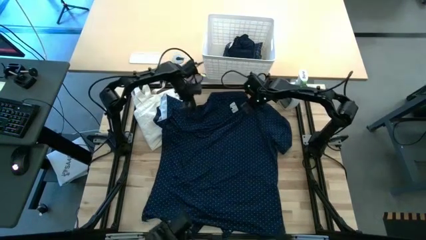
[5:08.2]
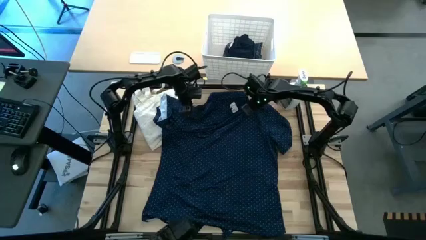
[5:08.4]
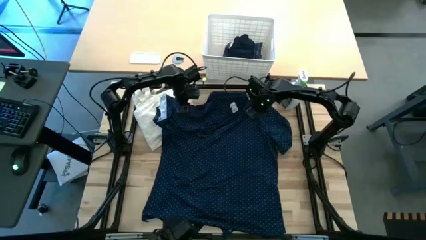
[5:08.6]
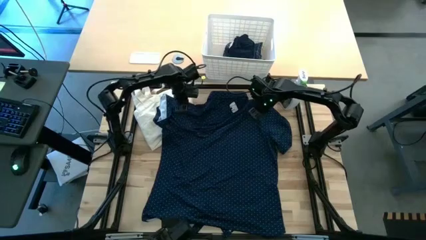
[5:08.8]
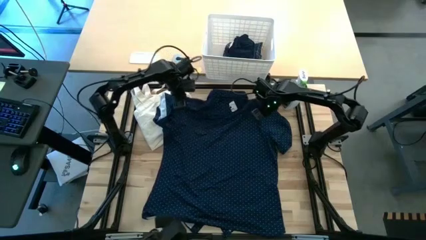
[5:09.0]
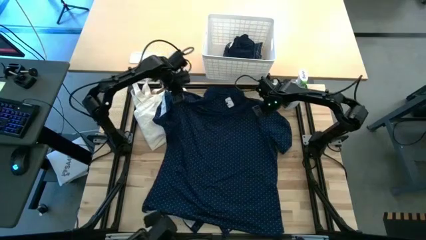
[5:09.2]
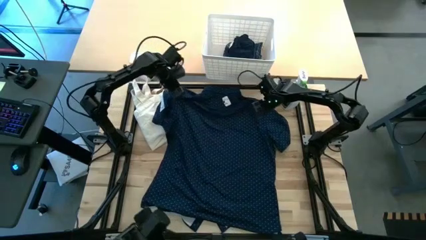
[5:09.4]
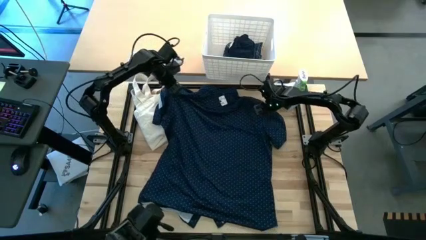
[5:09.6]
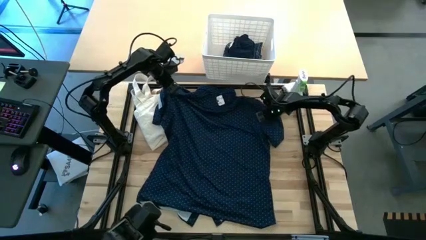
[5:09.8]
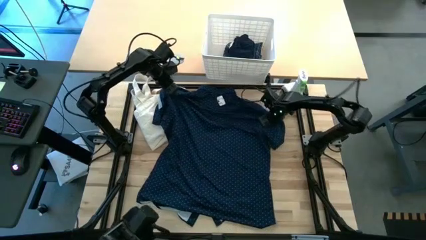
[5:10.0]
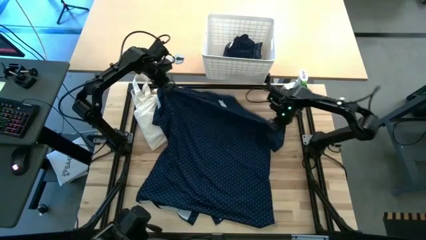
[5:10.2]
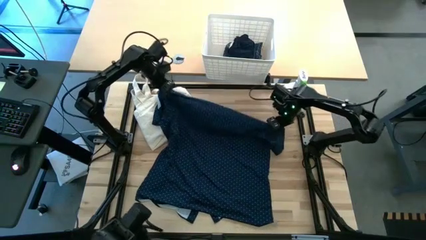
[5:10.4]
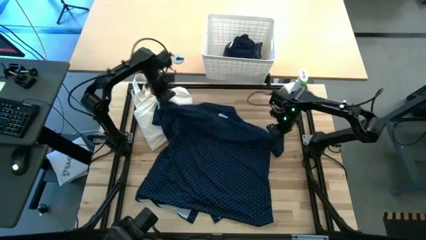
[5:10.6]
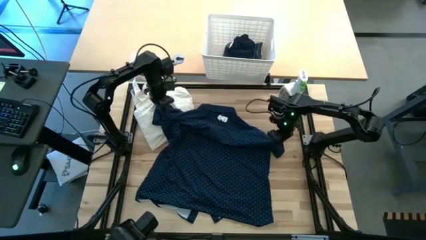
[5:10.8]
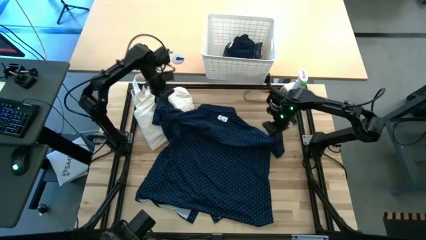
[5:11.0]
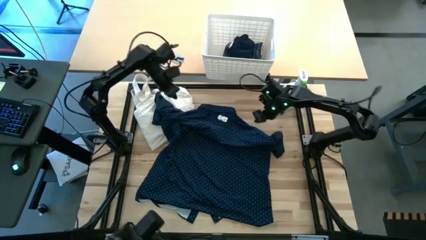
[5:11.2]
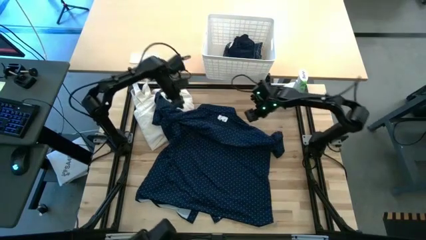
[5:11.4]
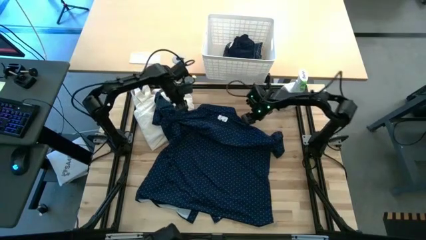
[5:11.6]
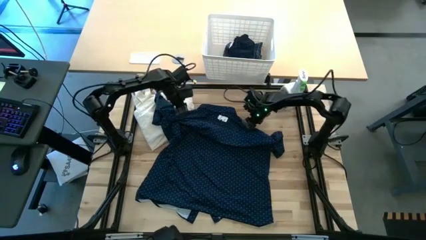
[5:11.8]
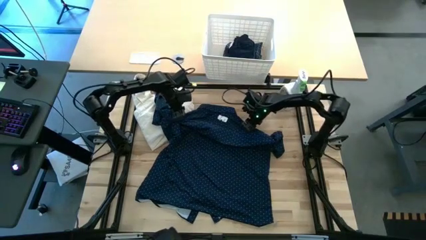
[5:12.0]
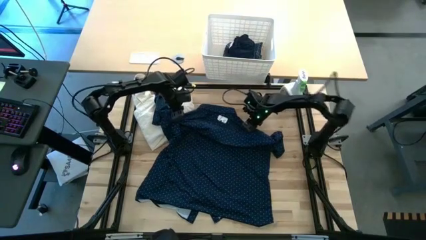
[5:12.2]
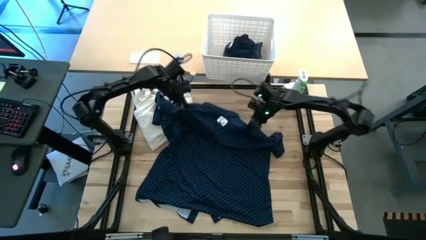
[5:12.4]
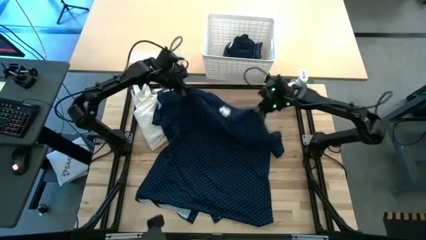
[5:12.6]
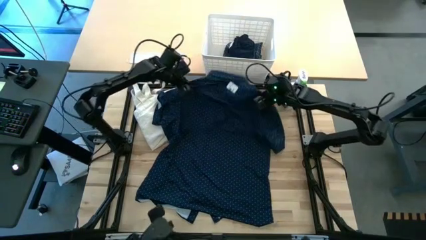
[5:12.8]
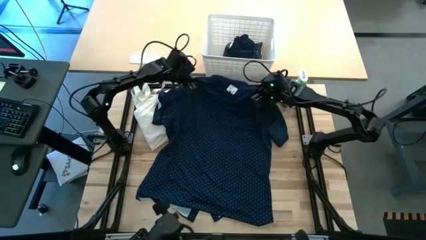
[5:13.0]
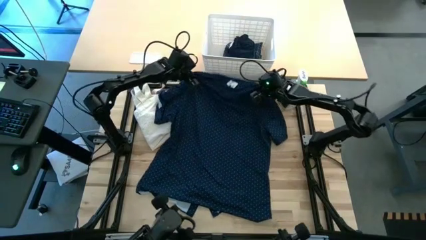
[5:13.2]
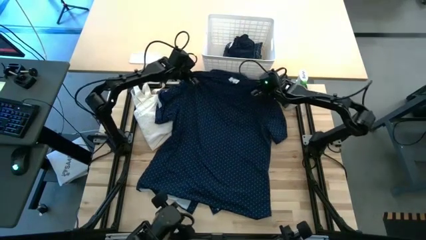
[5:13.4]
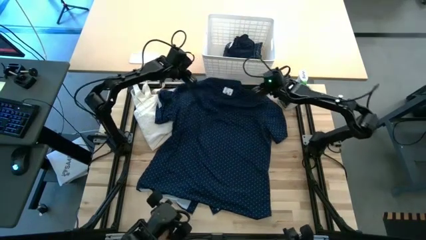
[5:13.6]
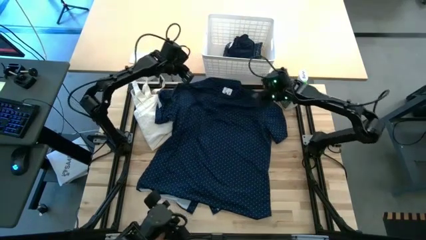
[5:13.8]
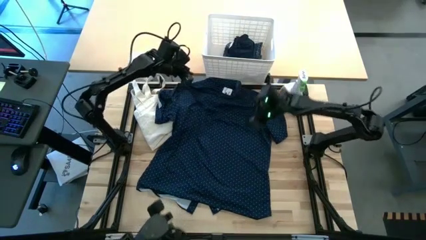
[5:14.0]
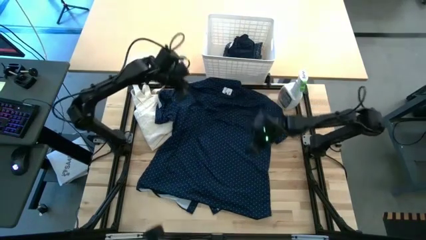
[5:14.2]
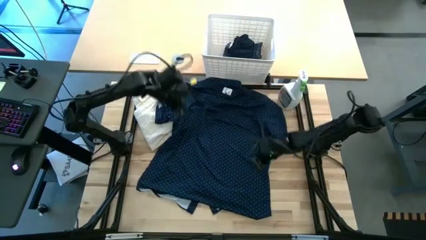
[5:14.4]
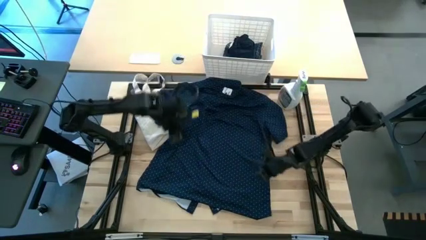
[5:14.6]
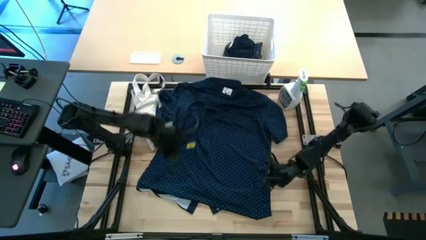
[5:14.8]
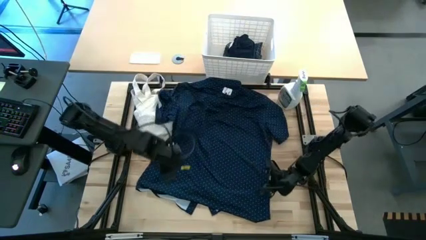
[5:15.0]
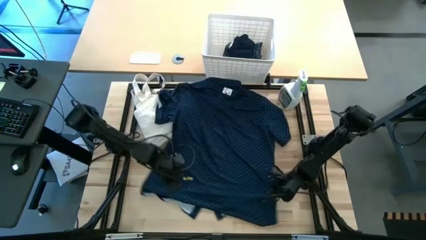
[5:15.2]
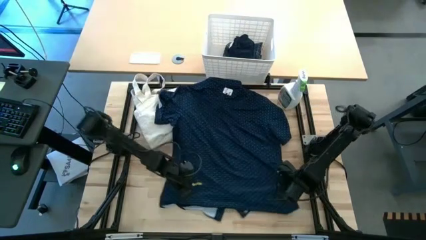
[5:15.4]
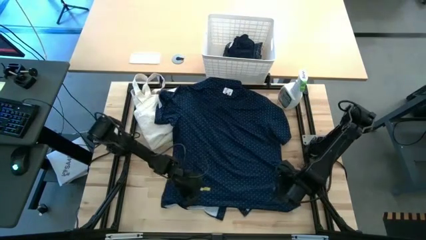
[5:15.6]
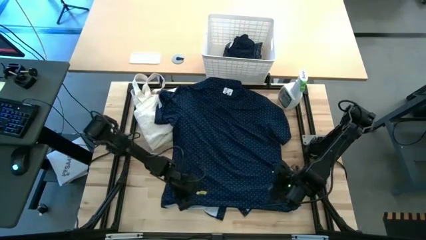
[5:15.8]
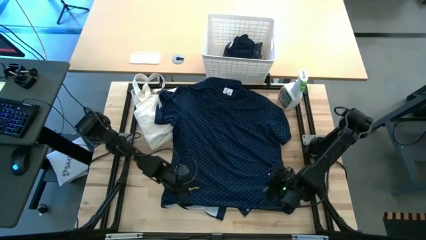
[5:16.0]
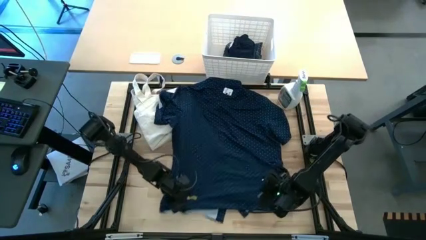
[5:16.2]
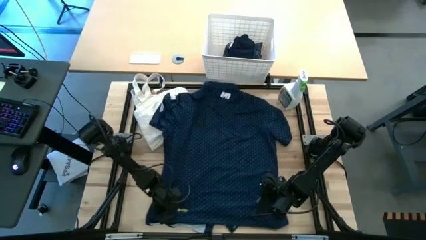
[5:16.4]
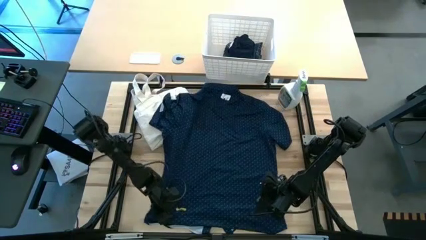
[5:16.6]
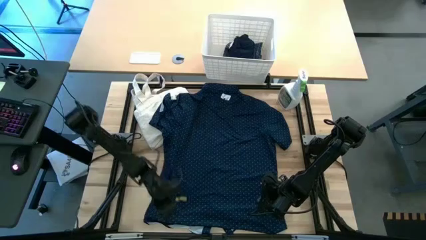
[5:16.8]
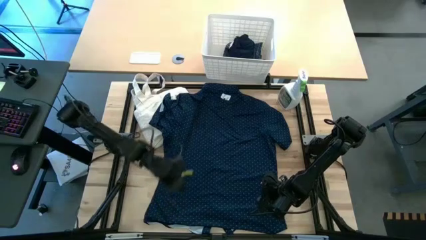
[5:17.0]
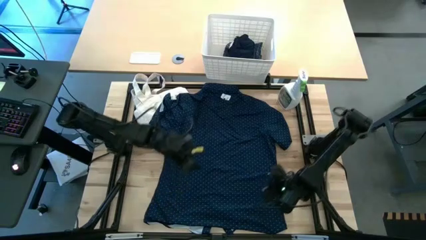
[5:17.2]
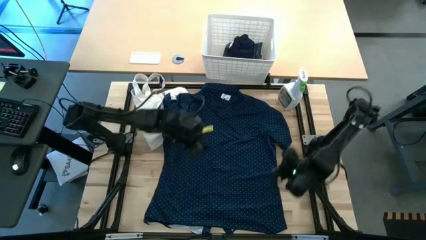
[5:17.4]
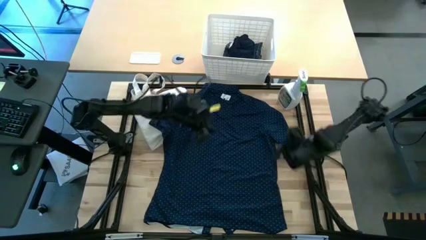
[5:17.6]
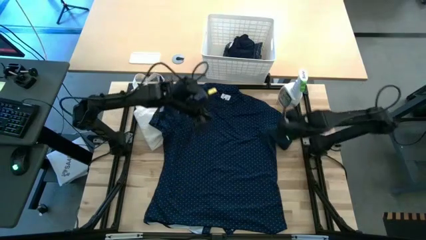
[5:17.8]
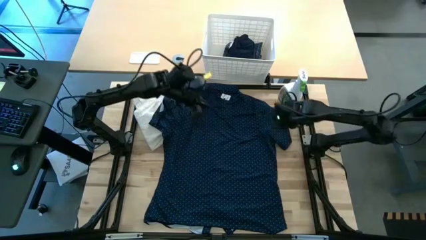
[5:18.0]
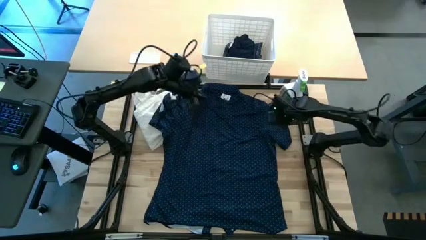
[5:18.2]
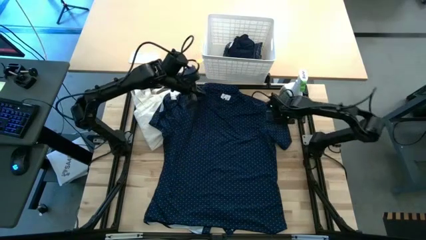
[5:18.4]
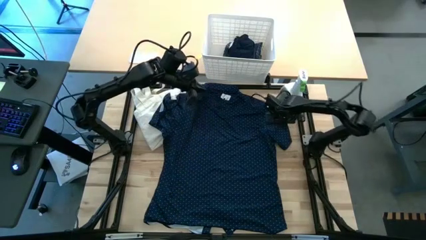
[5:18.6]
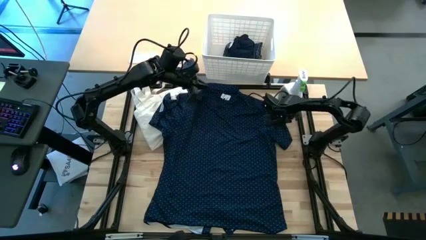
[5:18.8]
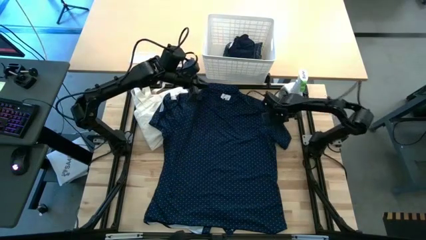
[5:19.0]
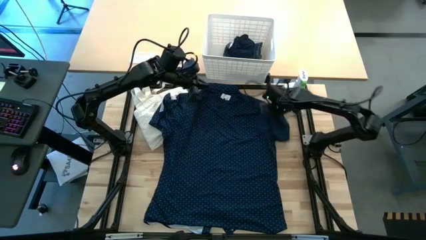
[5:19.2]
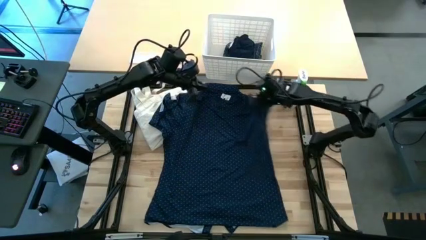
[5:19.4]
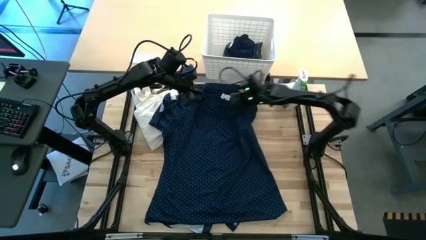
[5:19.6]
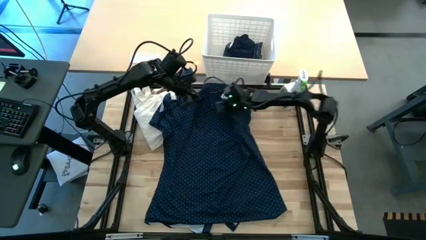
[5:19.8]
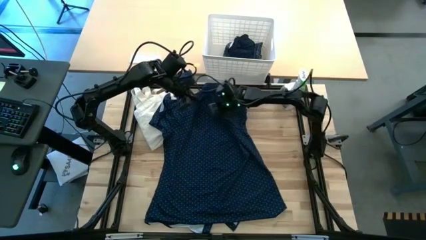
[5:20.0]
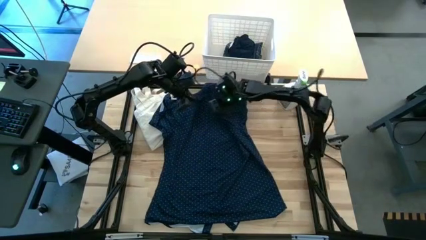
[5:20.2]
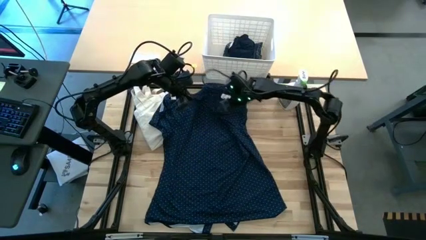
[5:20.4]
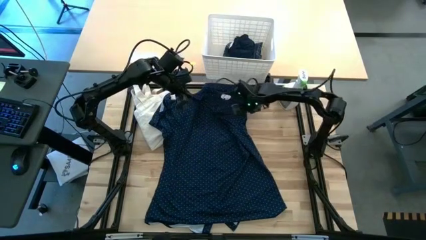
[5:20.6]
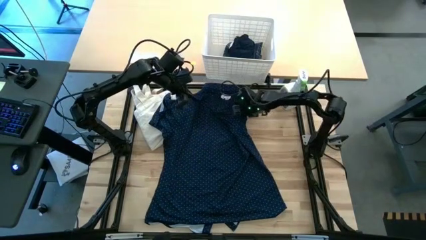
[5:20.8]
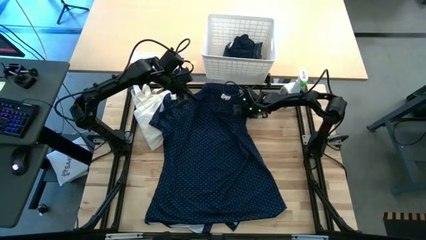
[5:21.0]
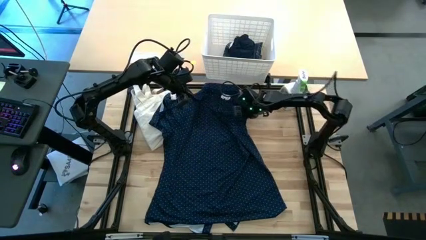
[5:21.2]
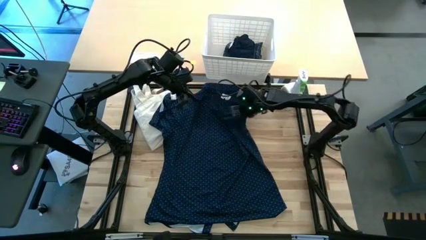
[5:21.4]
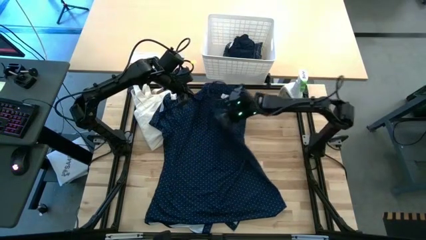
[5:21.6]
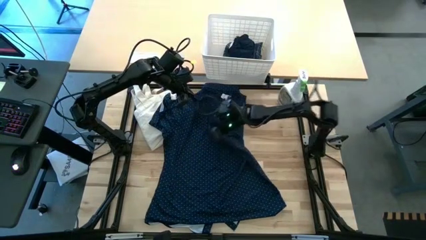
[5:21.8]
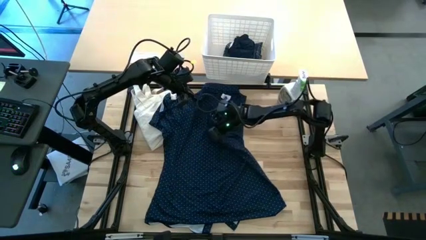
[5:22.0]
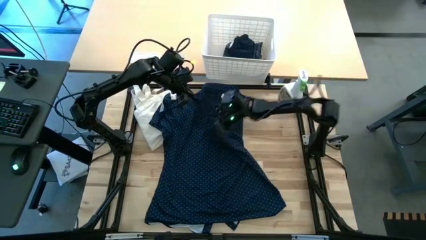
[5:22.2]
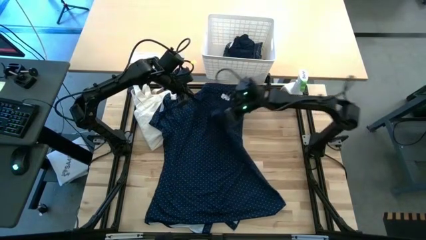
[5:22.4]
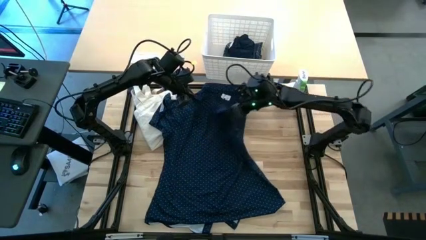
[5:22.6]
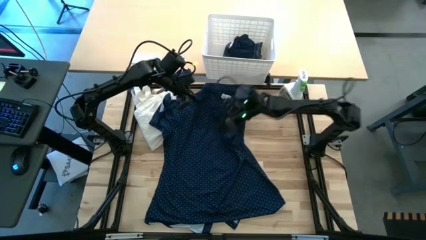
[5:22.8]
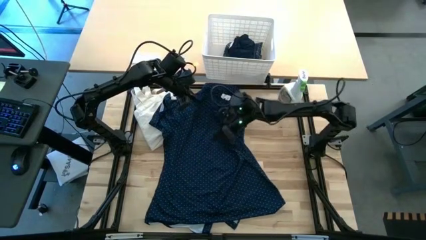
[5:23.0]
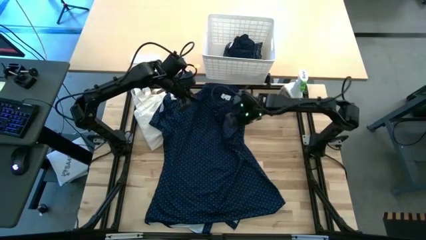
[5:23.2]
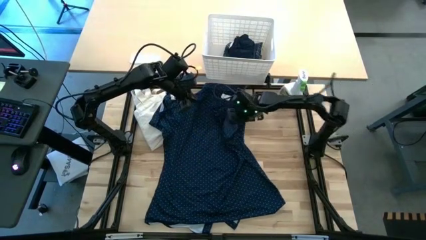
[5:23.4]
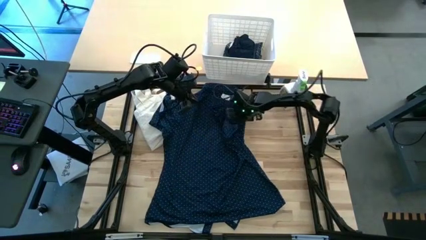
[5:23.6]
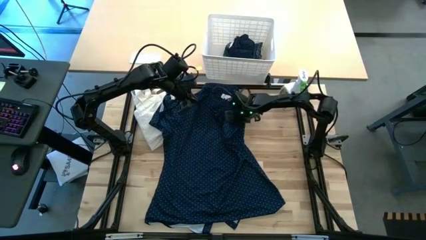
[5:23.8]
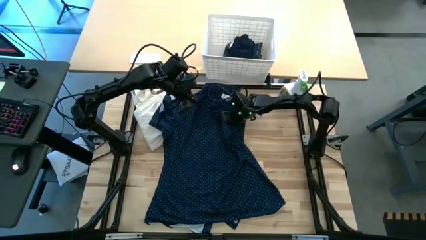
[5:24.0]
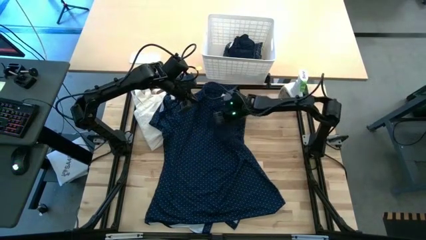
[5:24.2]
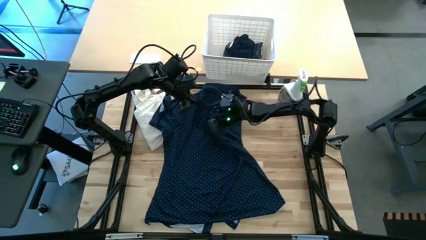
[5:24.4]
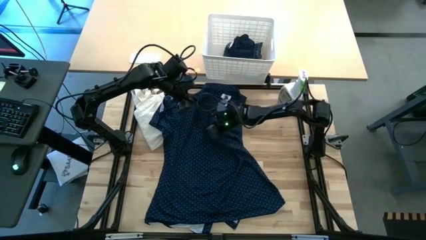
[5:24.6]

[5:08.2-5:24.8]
Fold the blue polo shirt

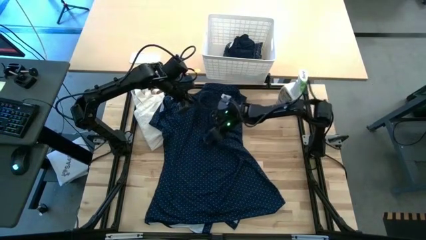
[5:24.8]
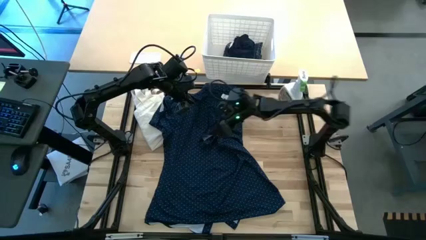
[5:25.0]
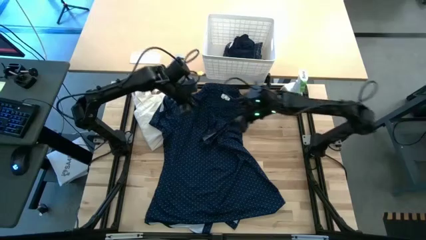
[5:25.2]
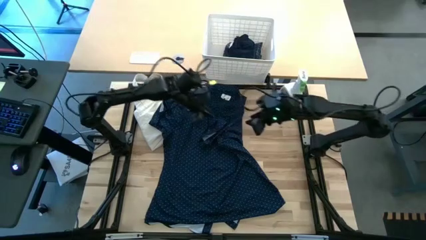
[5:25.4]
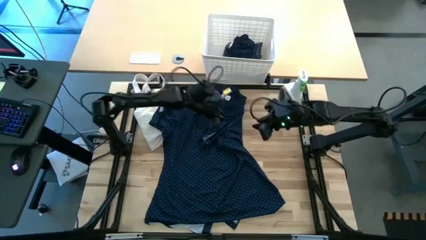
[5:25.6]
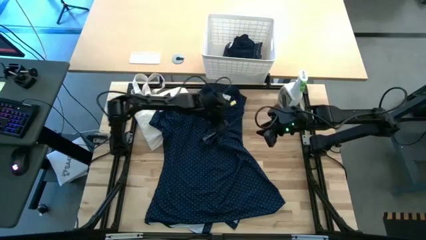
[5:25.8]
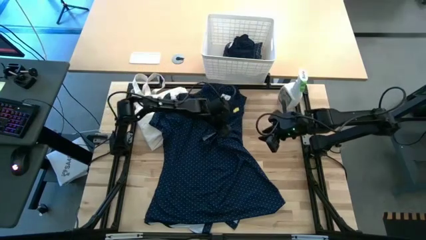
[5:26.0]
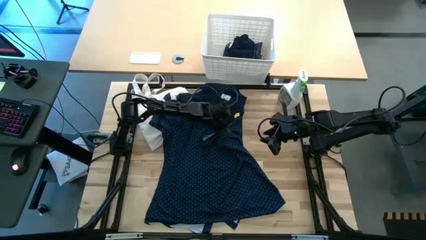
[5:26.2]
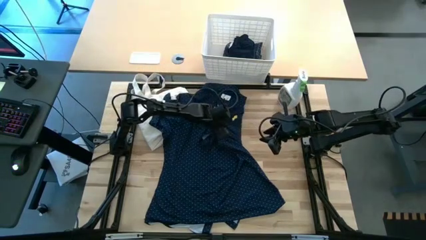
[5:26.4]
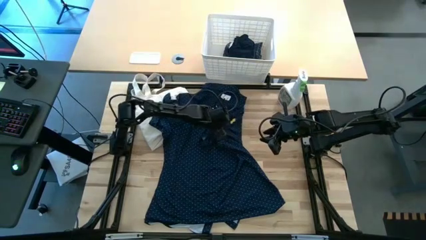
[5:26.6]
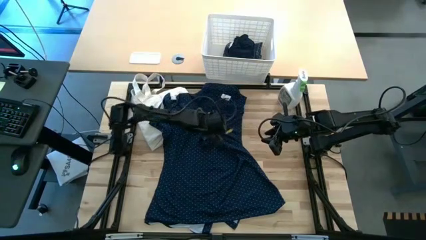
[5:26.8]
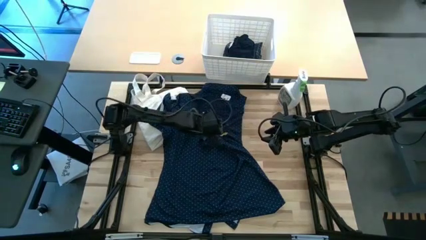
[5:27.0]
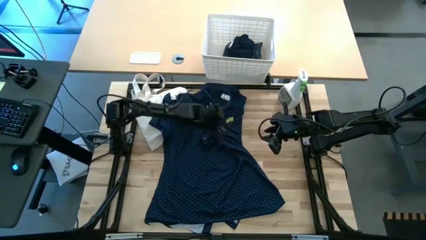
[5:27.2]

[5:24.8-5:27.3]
Fold the blue polo shirt
